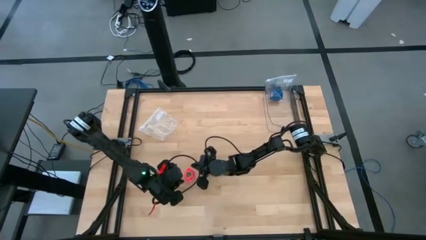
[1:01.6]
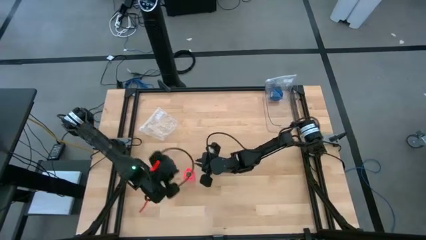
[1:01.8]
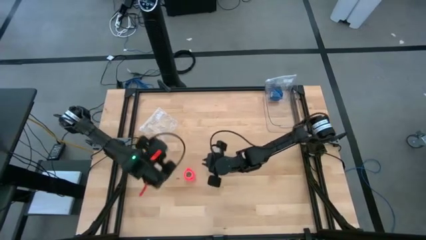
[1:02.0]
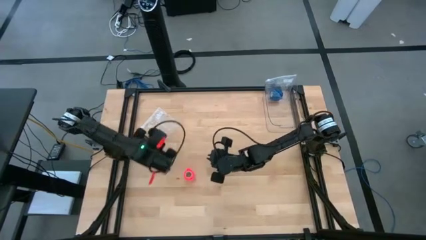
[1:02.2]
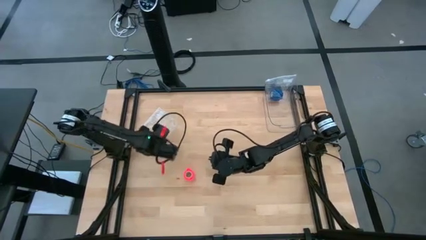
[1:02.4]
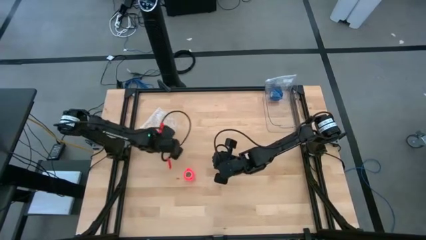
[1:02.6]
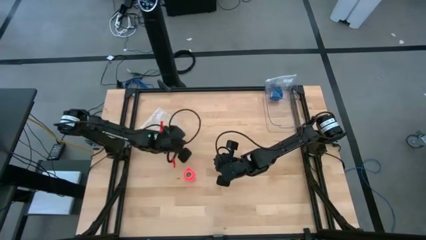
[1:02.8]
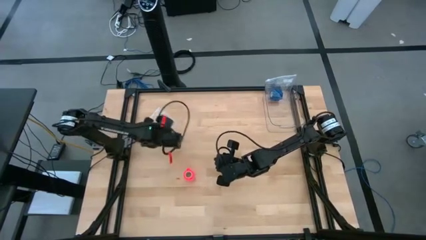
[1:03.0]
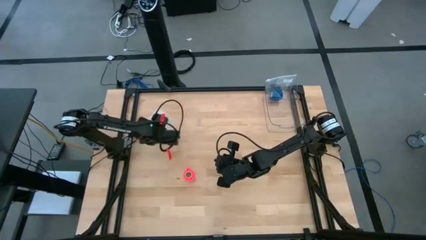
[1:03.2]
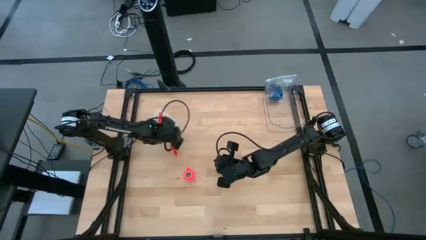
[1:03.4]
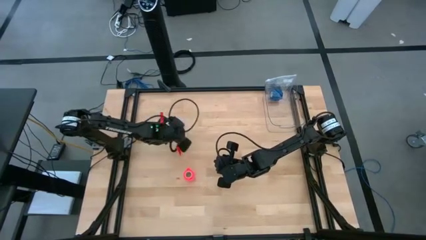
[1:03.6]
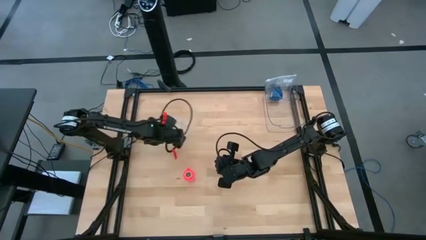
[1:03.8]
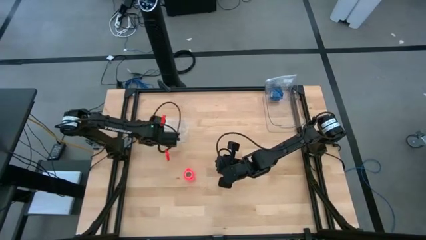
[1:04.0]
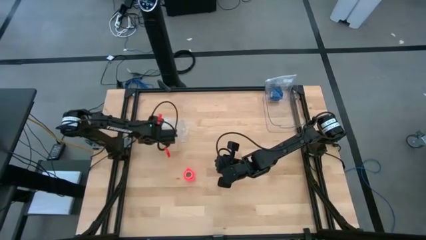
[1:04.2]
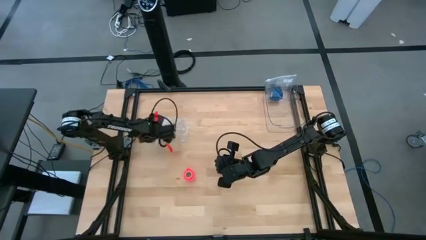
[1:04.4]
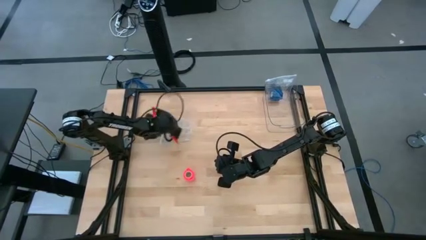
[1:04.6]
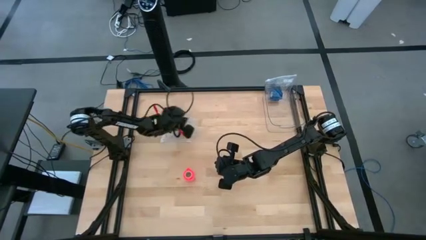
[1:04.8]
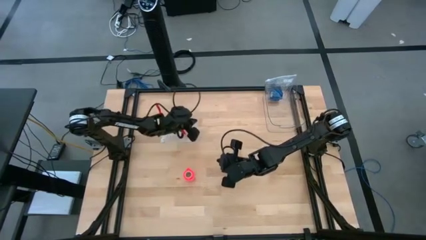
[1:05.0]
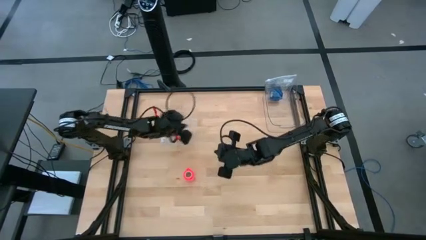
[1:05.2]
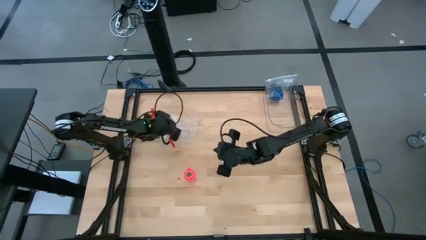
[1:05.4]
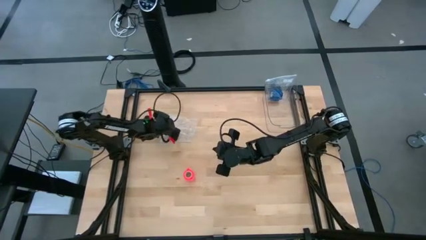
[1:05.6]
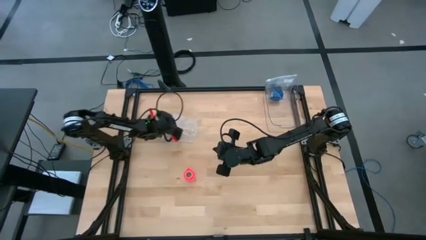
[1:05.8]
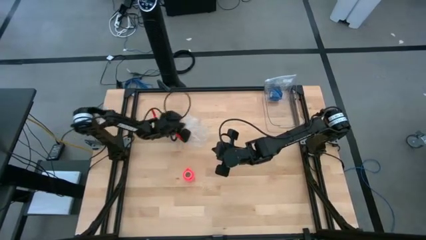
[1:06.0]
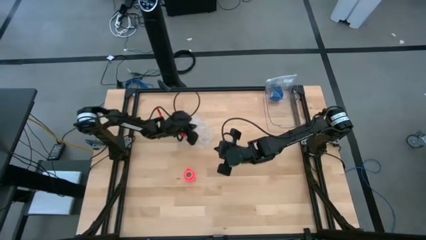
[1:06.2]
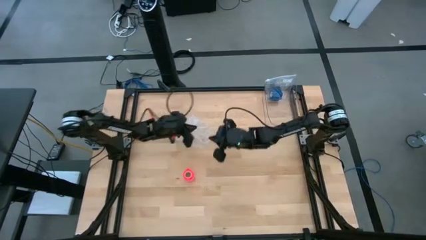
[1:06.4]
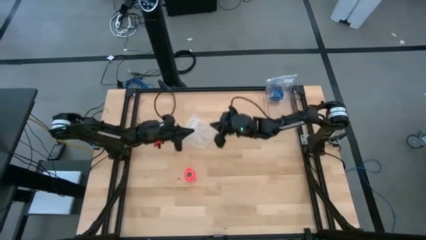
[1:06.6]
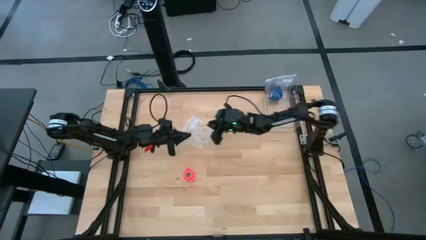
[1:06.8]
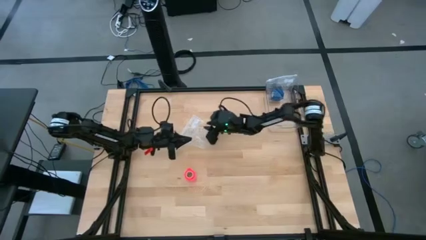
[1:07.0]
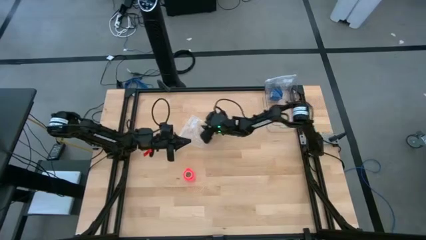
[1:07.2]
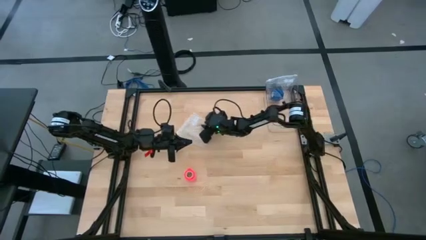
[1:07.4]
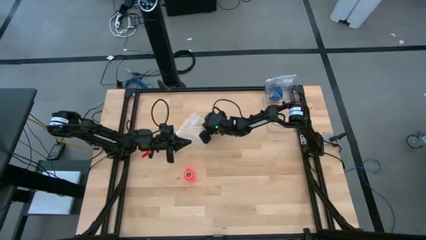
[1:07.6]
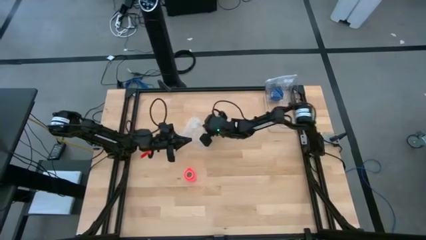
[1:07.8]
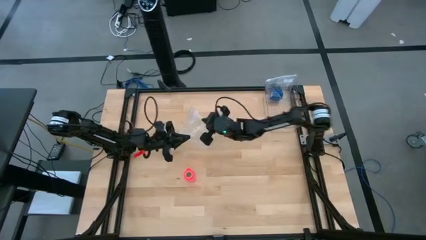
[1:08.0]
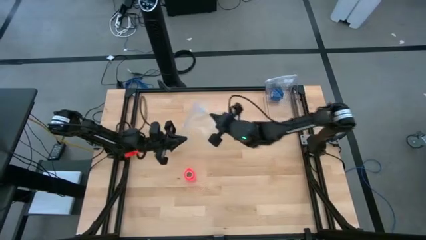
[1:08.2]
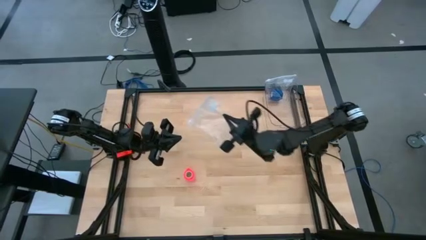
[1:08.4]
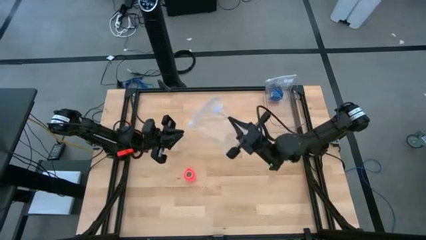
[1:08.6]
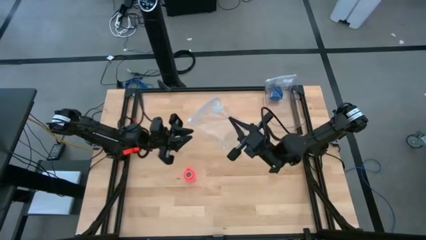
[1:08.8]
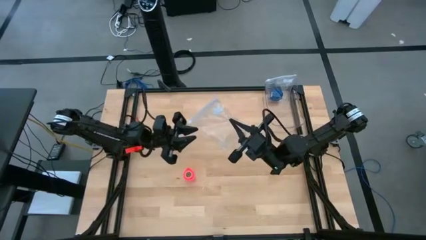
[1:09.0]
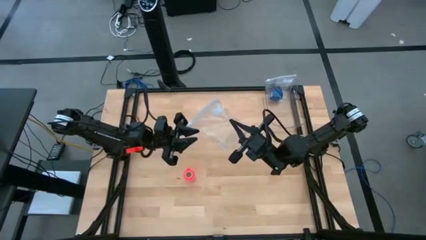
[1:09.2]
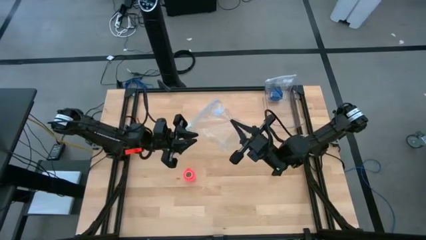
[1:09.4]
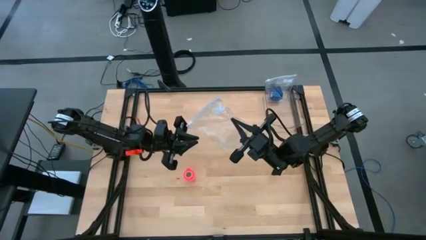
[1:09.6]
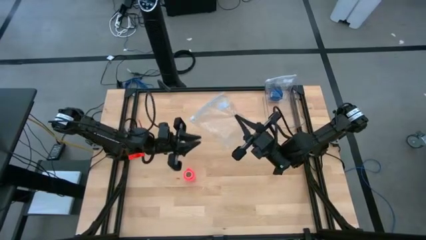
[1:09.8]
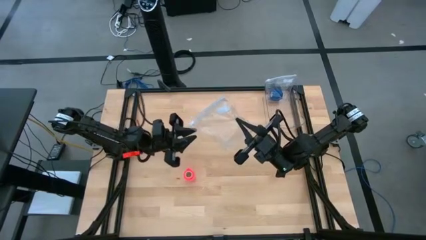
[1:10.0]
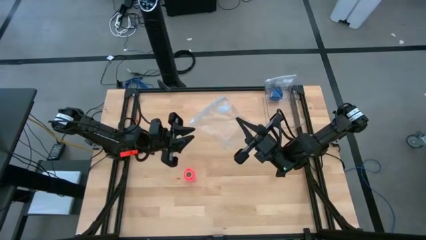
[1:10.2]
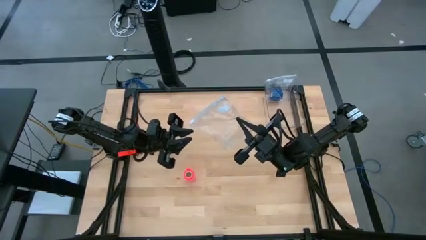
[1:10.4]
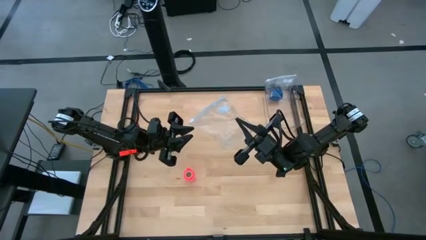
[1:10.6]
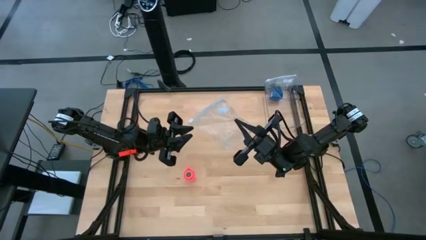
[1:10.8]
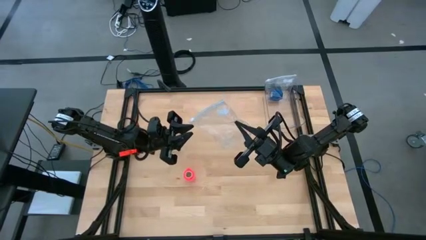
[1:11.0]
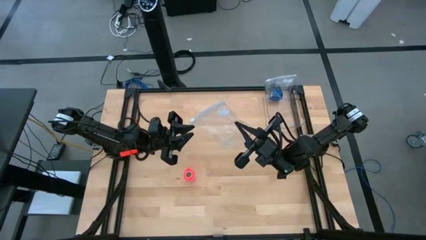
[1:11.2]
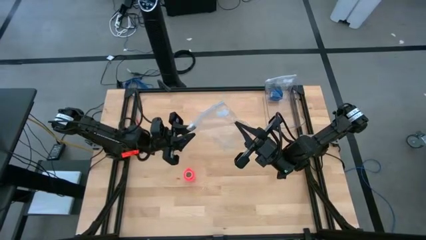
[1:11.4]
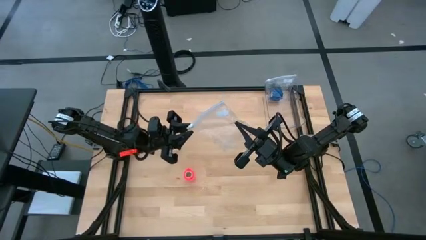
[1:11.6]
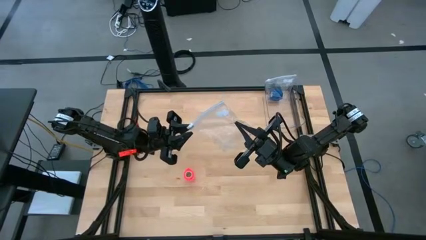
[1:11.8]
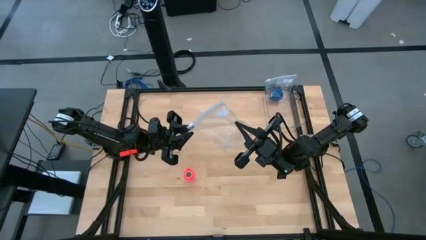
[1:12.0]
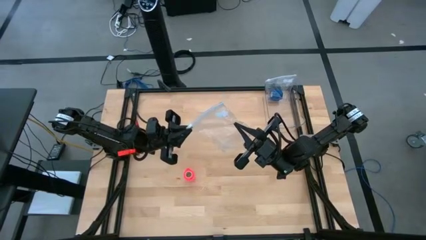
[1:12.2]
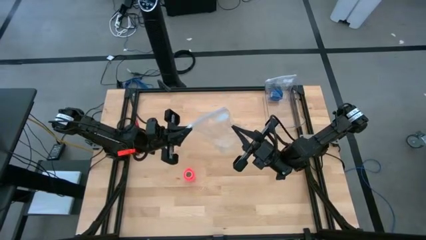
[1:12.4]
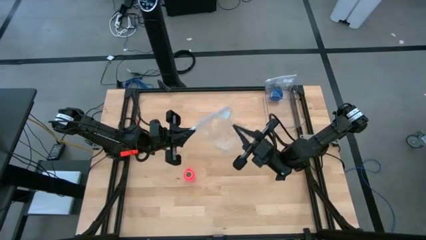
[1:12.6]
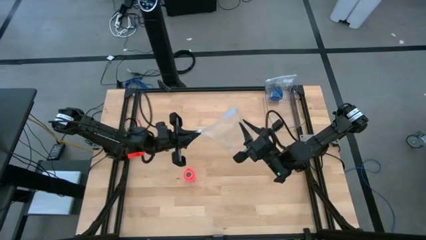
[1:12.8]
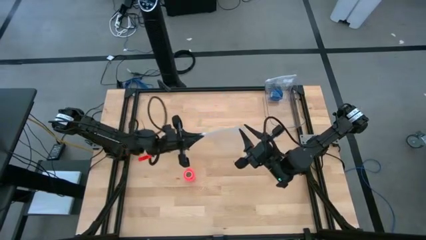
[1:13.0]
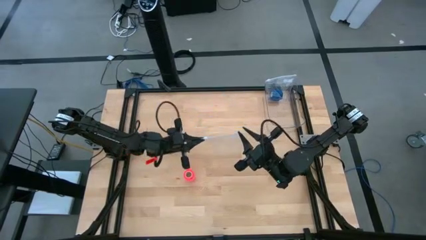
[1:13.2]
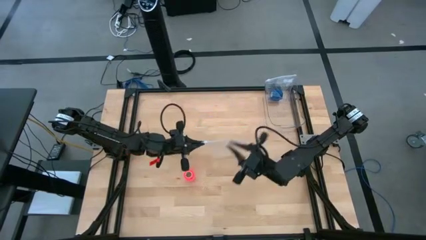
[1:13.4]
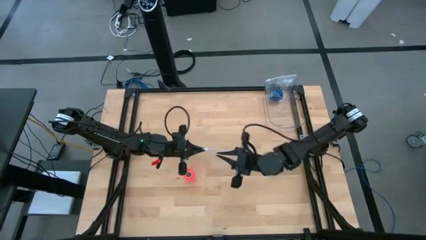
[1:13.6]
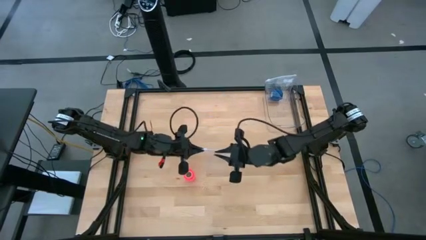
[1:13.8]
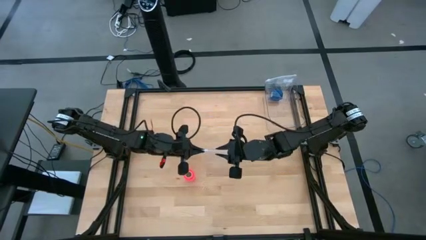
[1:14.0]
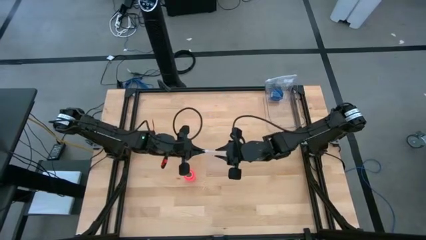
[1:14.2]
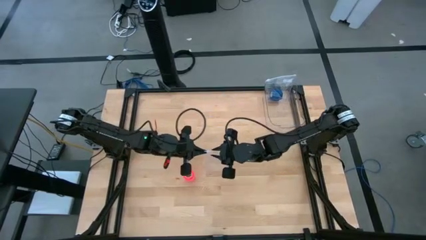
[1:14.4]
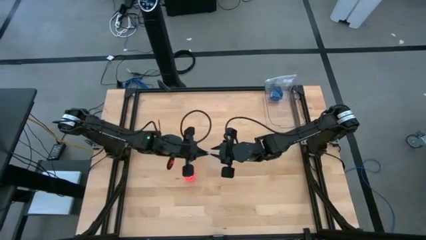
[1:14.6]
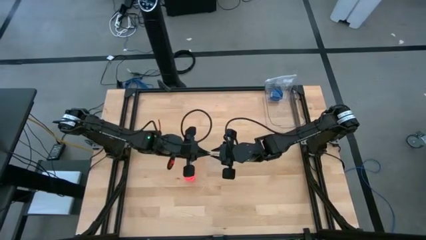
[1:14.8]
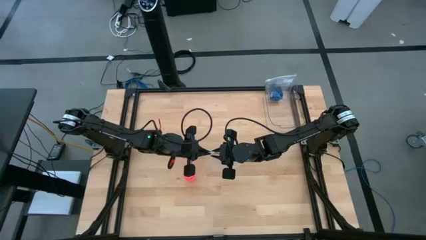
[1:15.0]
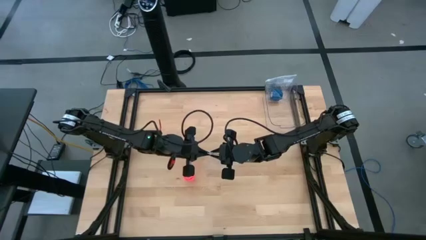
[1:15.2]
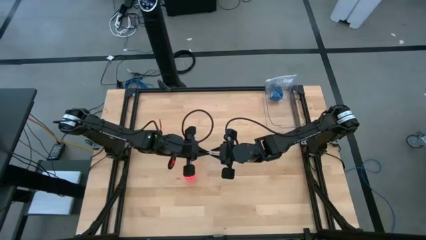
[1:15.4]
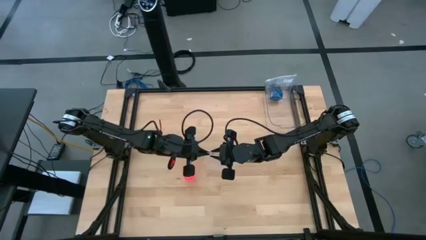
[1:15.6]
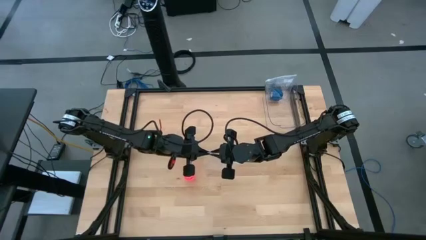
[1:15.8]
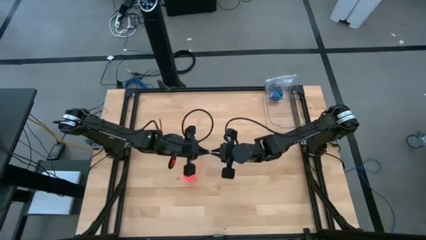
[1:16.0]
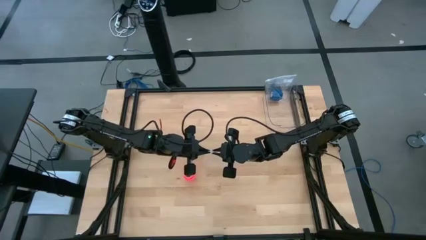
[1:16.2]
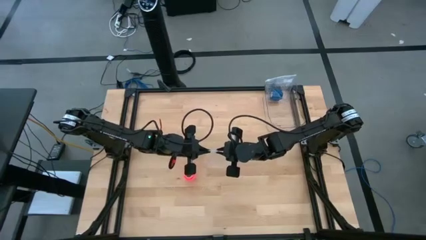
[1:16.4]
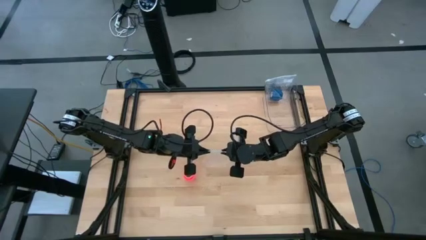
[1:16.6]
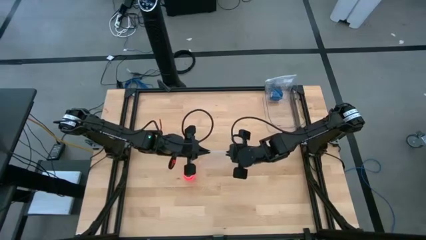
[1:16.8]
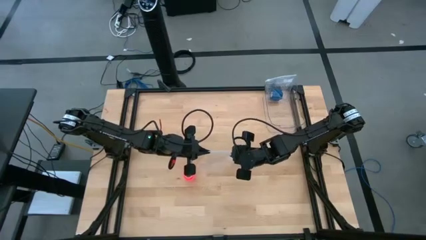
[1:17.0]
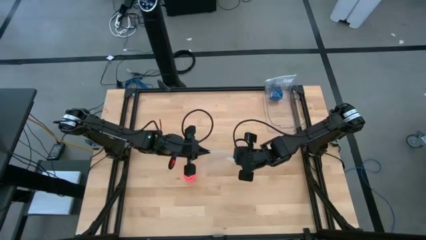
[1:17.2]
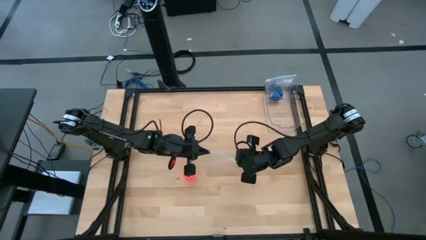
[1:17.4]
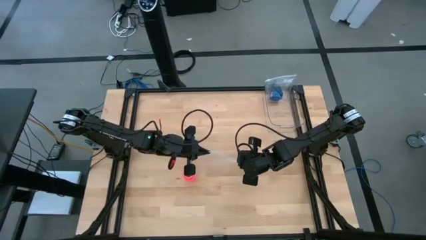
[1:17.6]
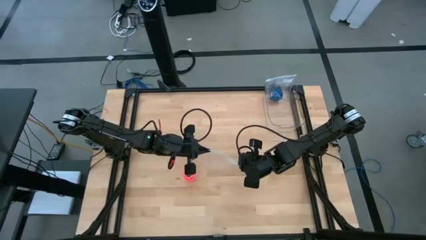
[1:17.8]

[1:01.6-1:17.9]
Task: Roll bandage
Open the transparent zip bag
